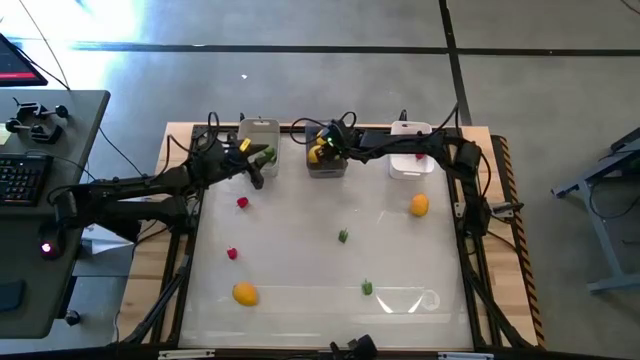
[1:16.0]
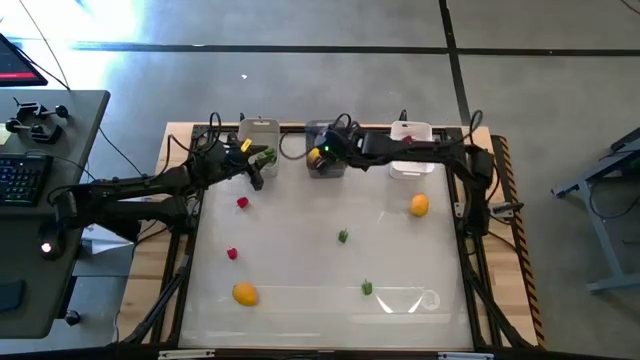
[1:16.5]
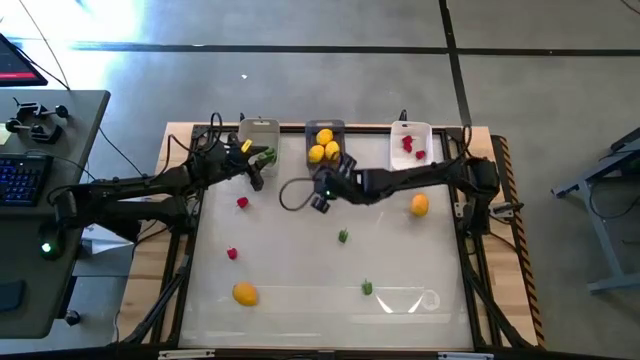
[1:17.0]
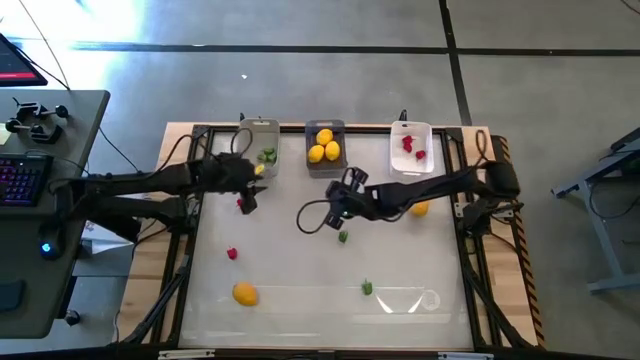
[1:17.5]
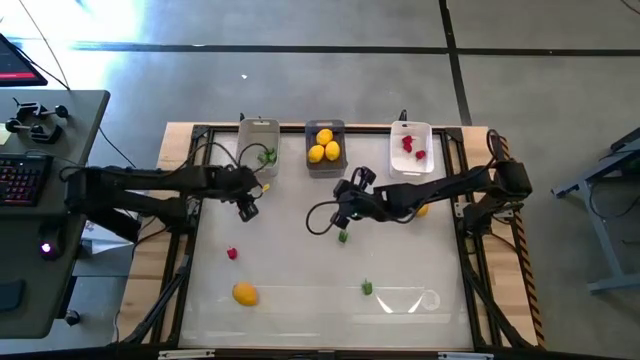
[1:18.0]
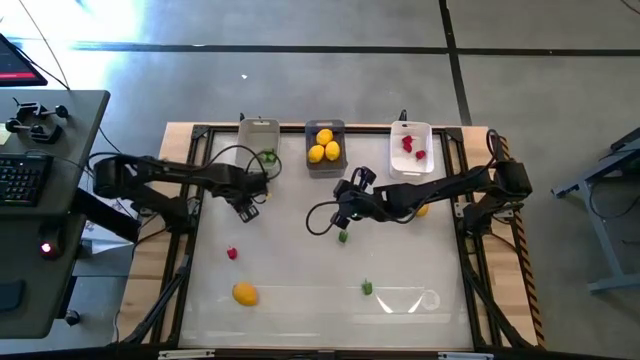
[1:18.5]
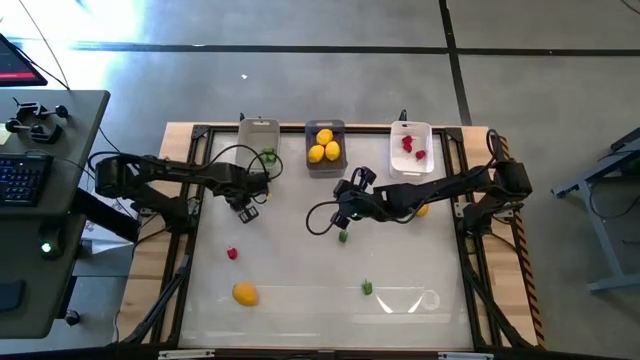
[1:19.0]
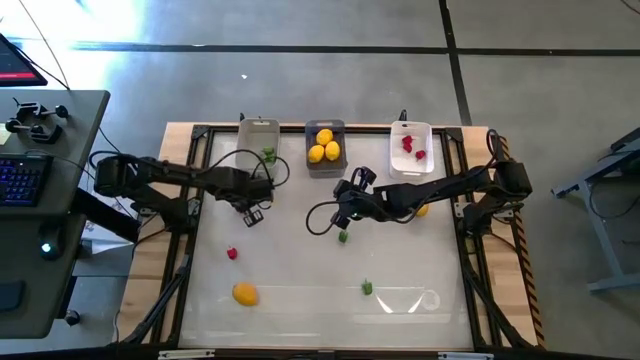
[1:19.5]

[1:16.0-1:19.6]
Task: Sort produce into baskets
Put the top red bell pepper into the white bin

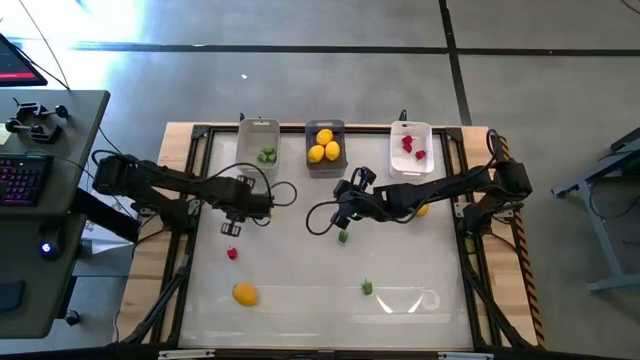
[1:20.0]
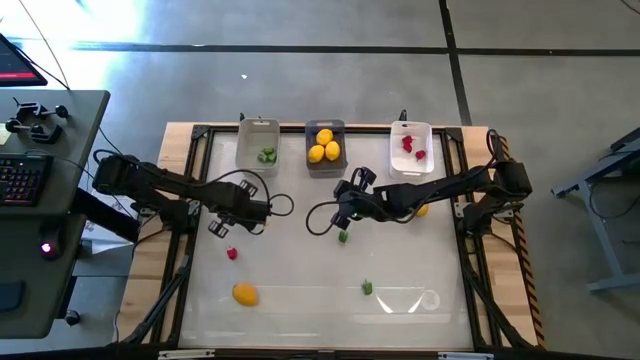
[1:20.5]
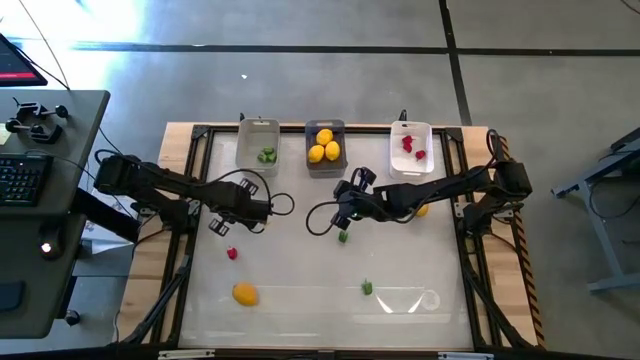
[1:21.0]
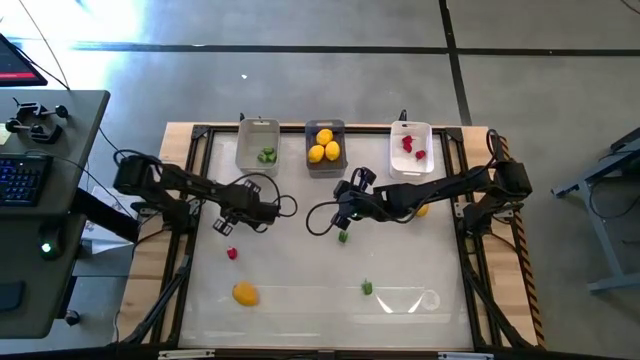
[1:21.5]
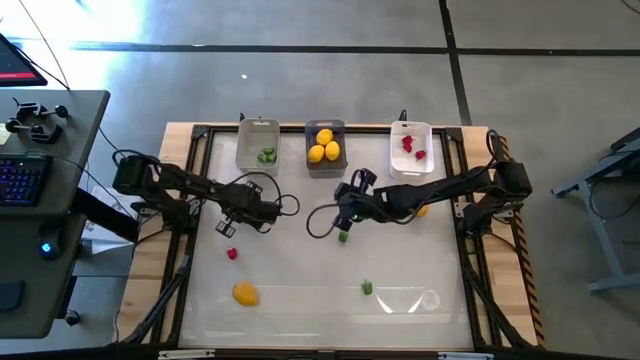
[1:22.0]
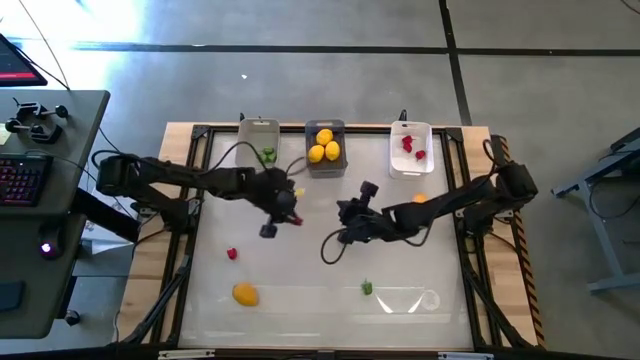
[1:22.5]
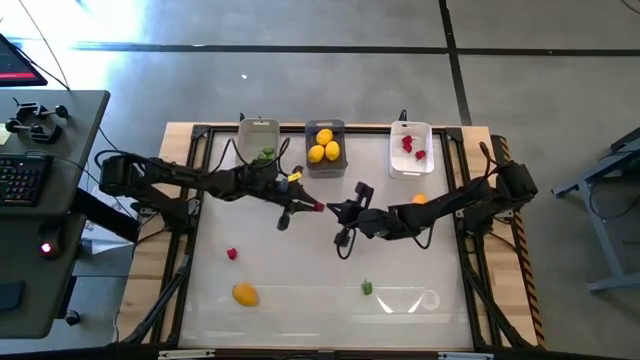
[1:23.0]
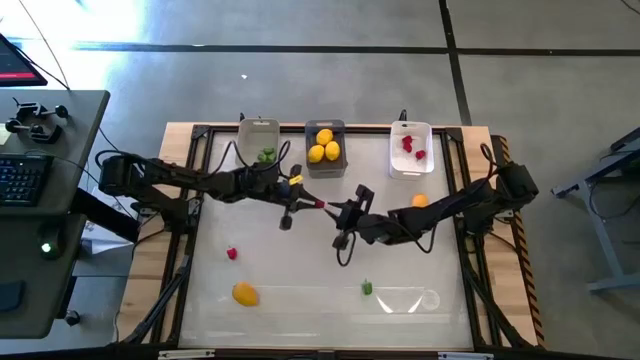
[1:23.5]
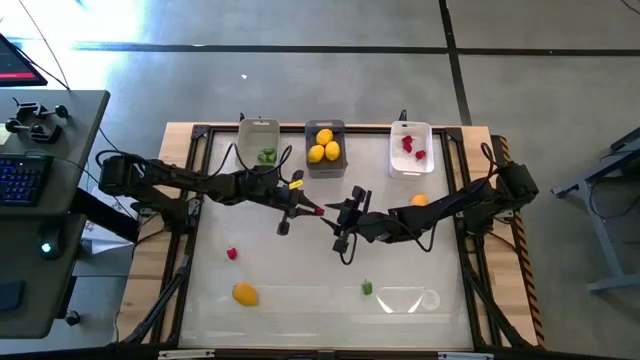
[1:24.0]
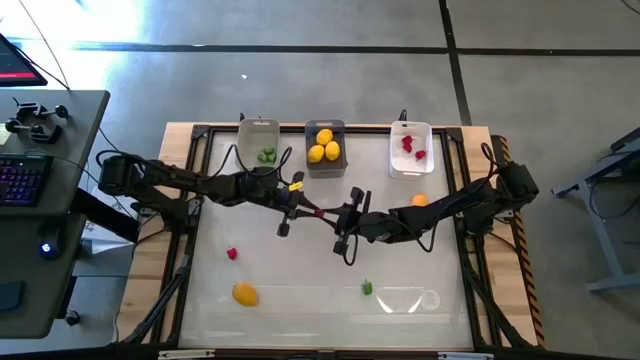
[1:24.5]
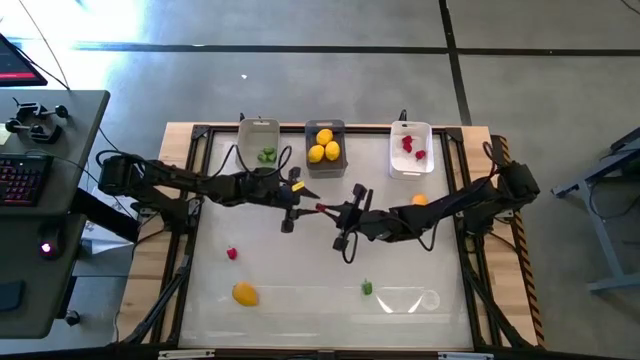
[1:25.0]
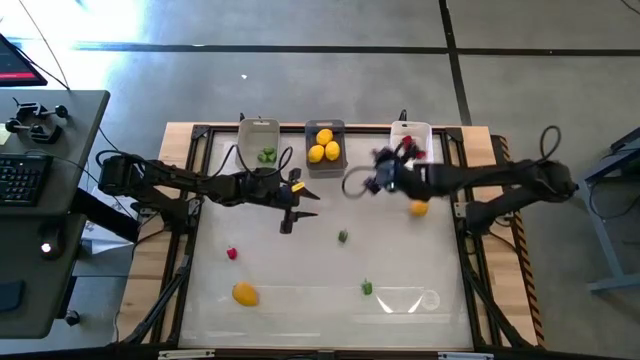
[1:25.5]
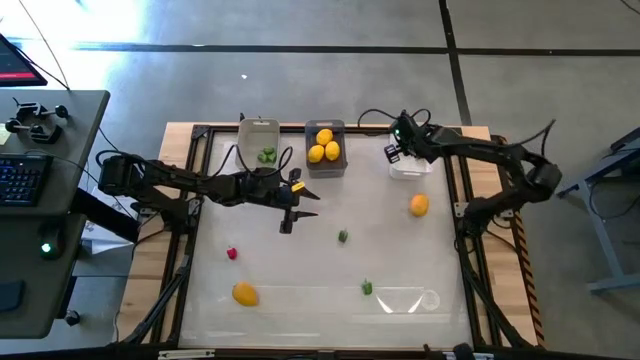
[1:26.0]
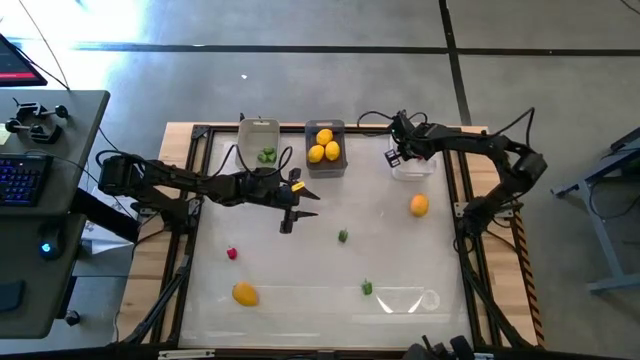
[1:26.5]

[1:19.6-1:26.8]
Put the top red bell pepper into the white bin

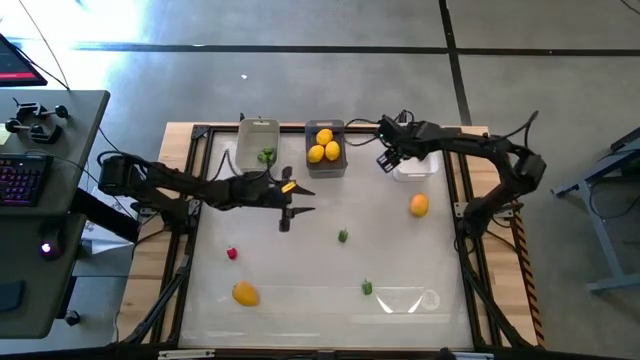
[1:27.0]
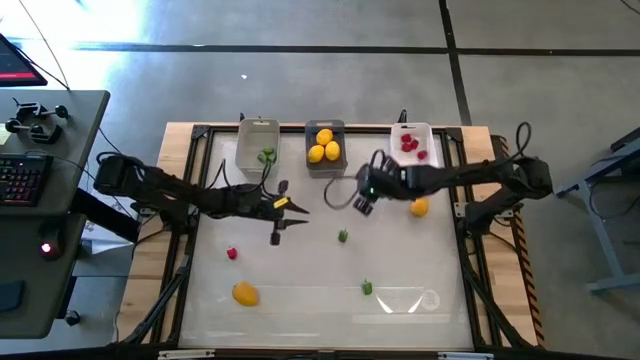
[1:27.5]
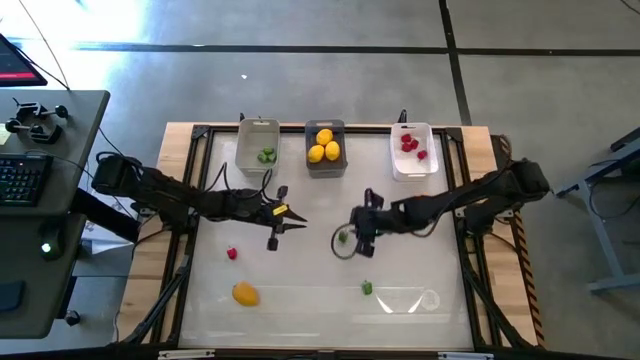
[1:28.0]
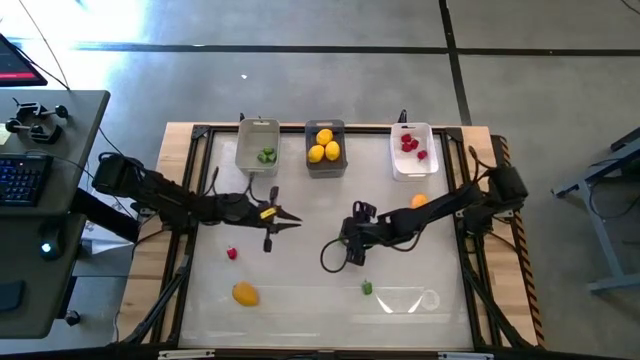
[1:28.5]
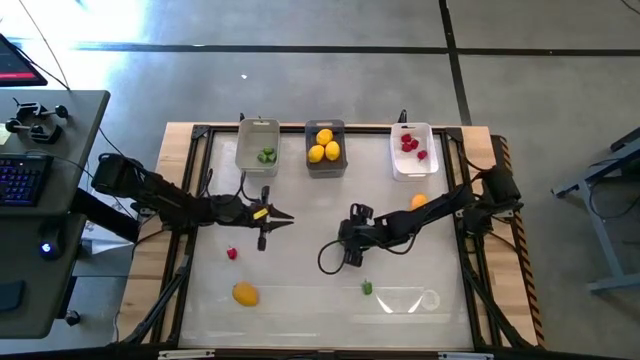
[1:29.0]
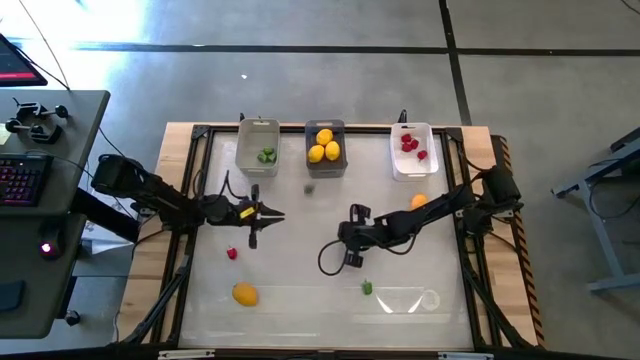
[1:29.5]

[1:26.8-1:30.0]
Put the top green bell pepper into the gray bin

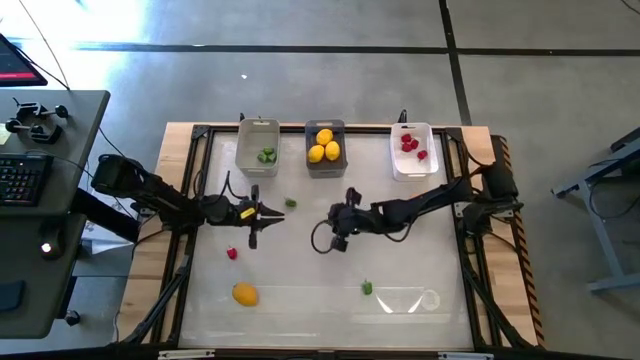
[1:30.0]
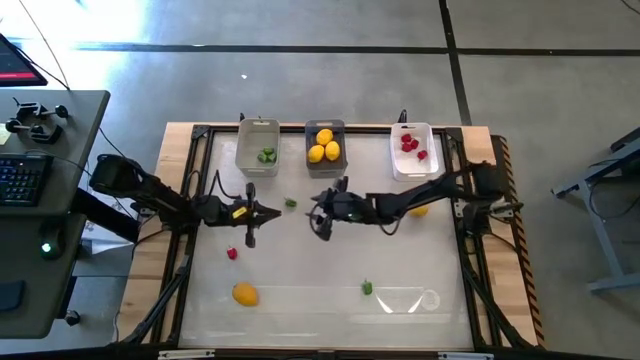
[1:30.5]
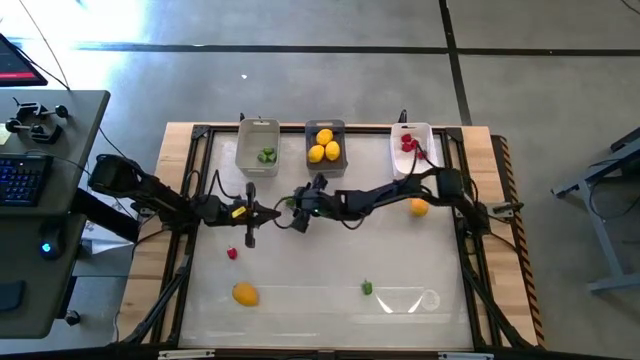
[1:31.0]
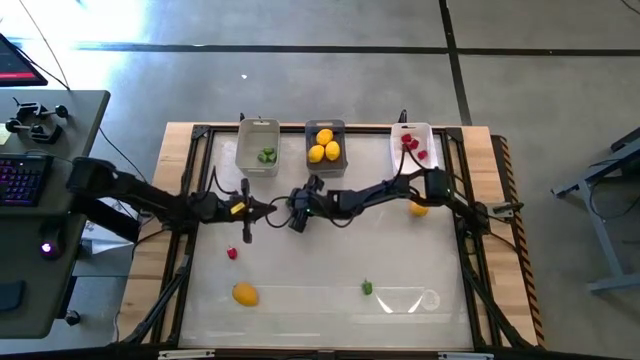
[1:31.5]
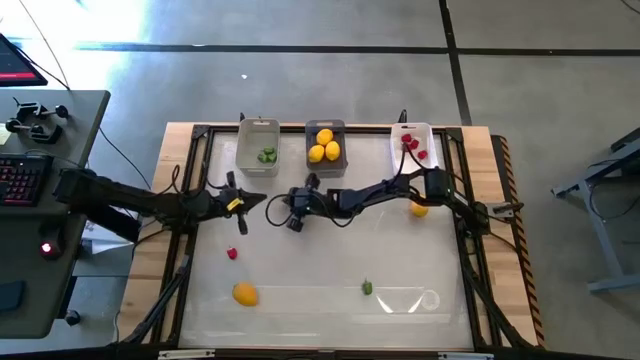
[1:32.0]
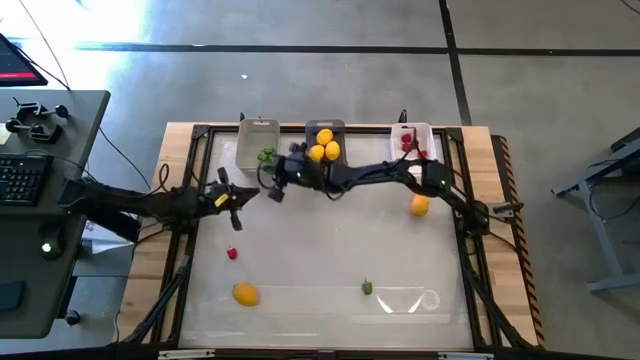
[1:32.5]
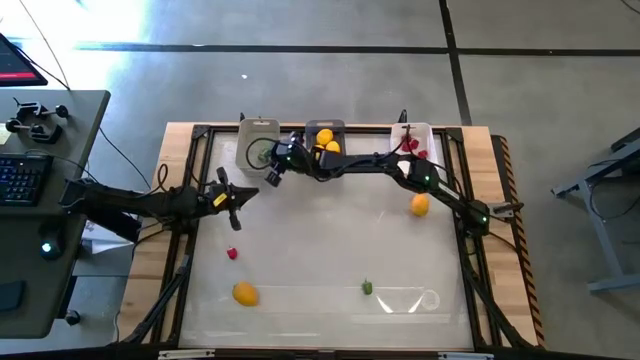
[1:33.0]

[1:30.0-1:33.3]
Put the top green bell pepper into the gray bin

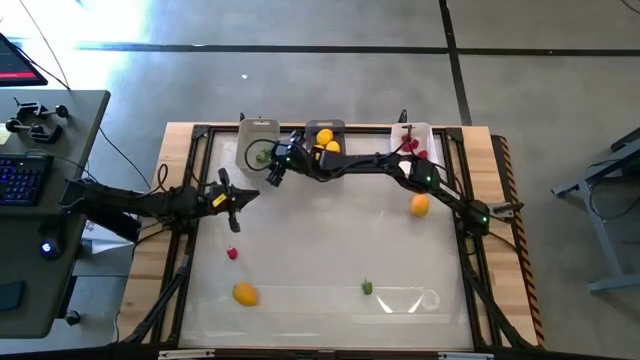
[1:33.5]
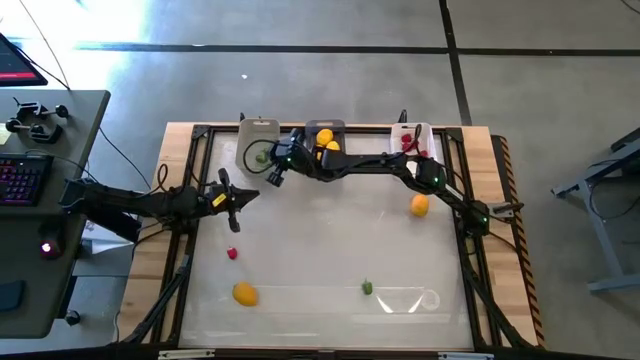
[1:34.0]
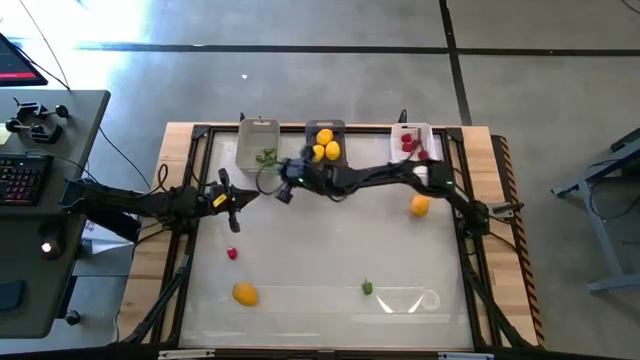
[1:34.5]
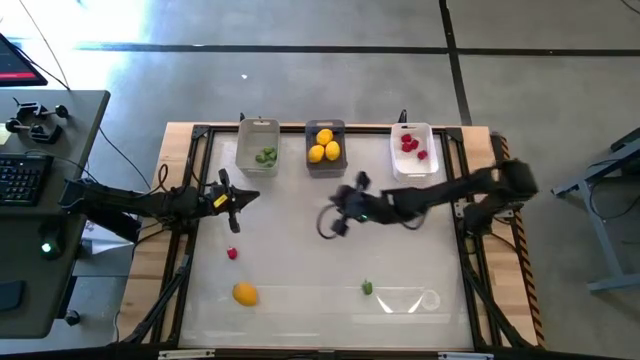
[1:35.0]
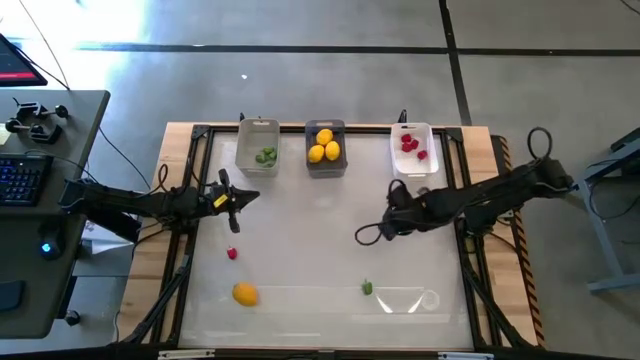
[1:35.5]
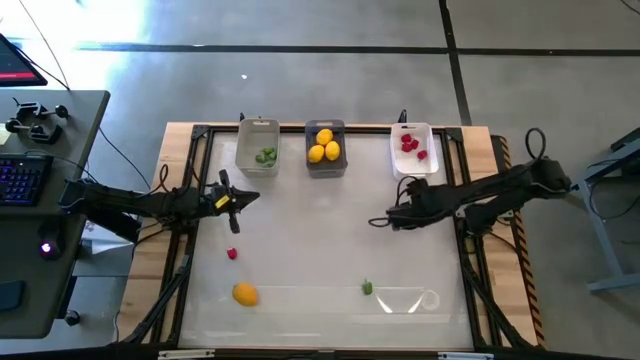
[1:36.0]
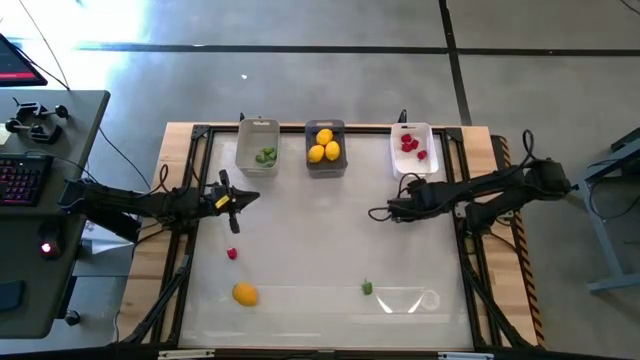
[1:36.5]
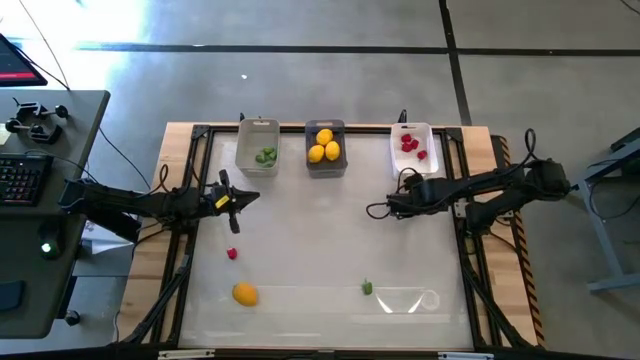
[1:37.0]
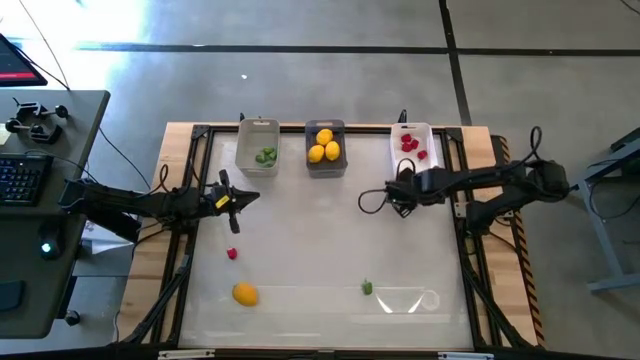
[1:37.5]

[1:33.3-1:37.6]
Put the lemon into the black bin
